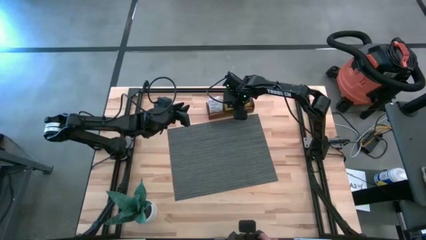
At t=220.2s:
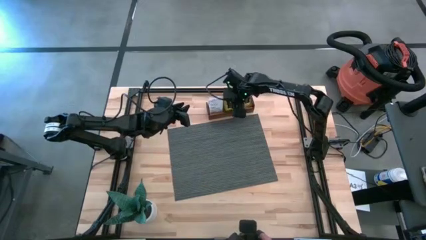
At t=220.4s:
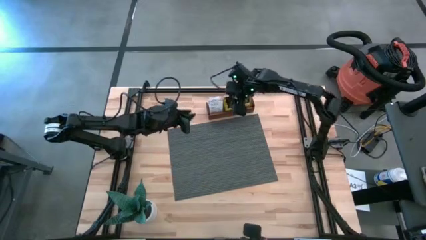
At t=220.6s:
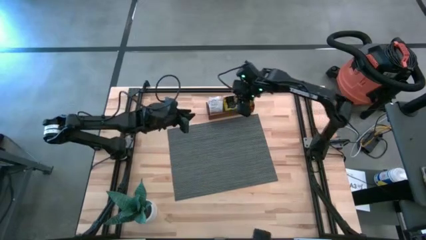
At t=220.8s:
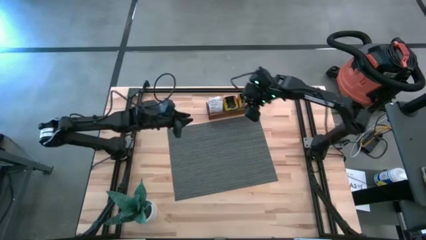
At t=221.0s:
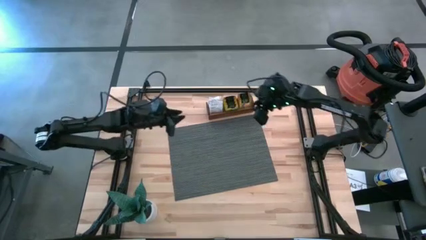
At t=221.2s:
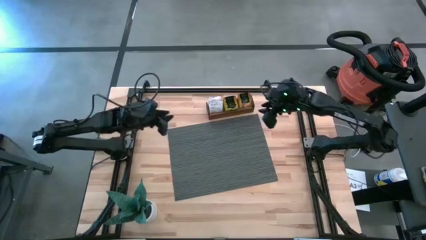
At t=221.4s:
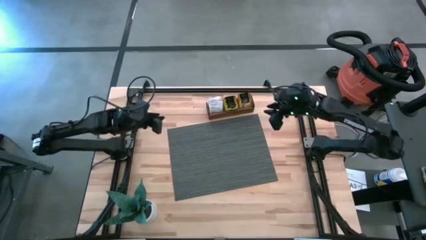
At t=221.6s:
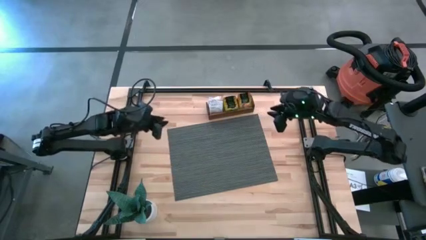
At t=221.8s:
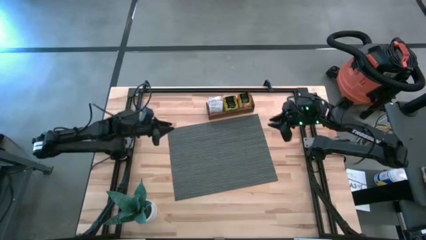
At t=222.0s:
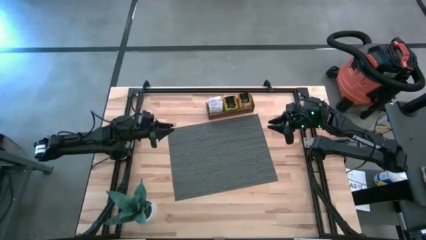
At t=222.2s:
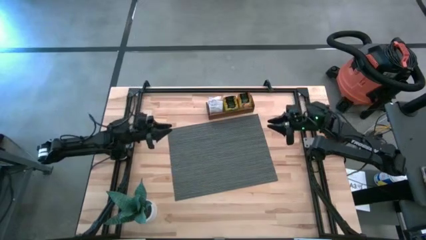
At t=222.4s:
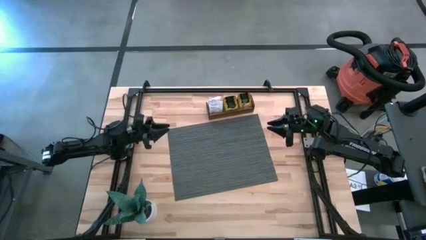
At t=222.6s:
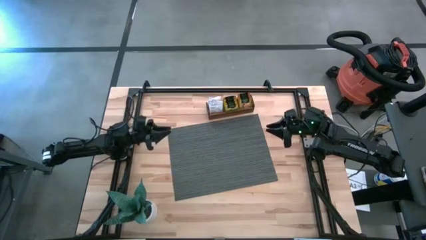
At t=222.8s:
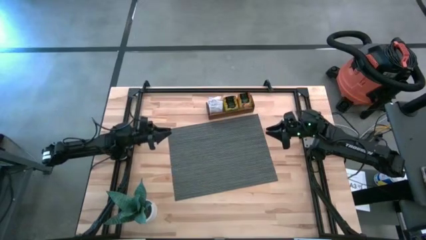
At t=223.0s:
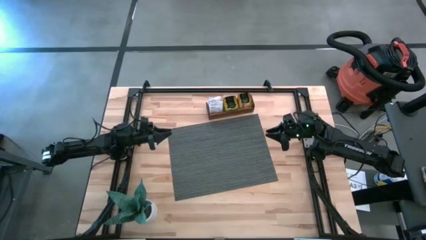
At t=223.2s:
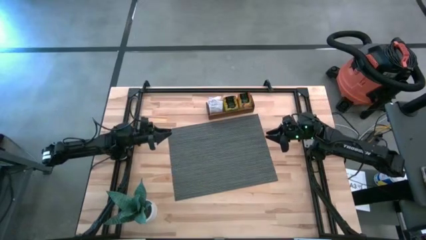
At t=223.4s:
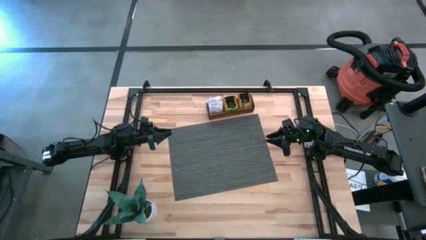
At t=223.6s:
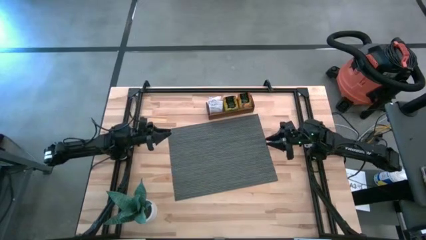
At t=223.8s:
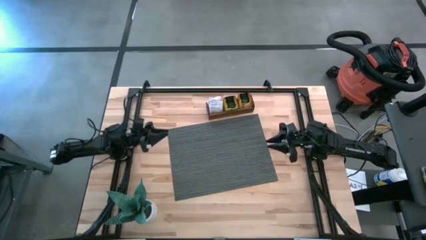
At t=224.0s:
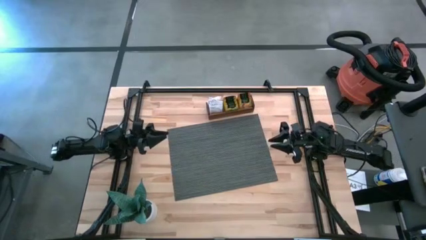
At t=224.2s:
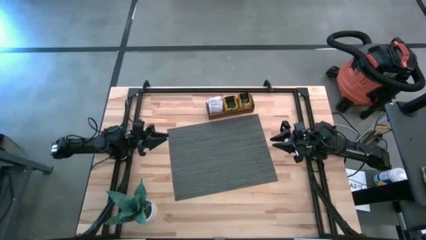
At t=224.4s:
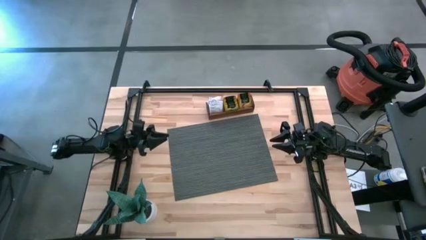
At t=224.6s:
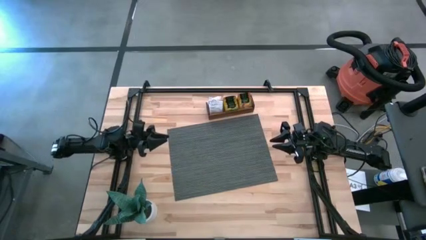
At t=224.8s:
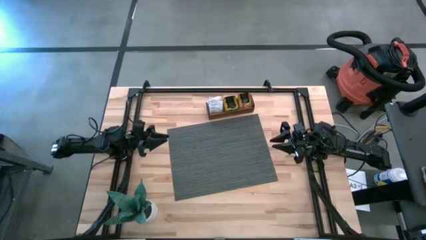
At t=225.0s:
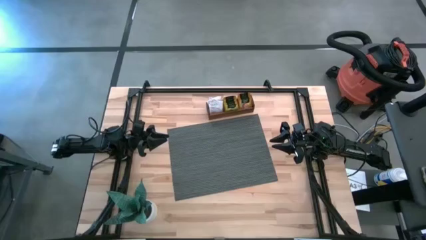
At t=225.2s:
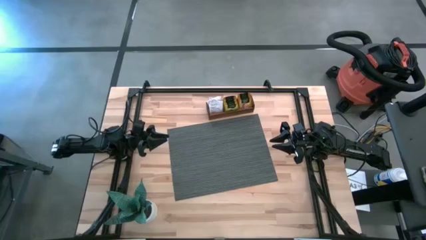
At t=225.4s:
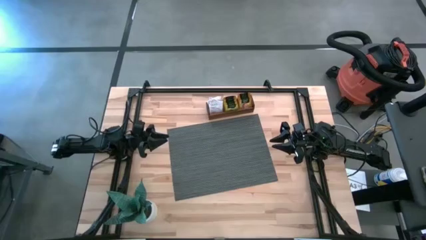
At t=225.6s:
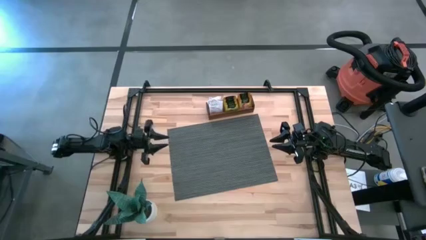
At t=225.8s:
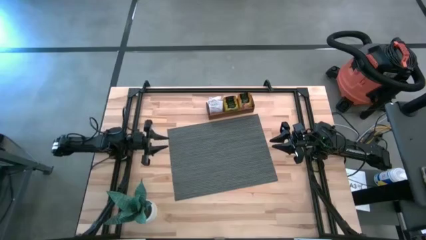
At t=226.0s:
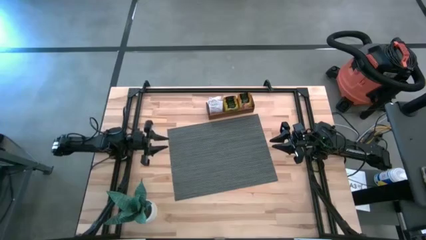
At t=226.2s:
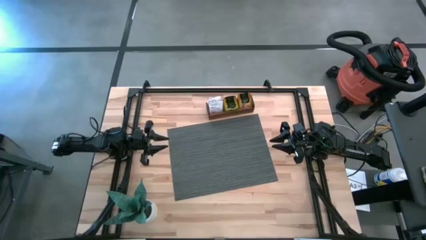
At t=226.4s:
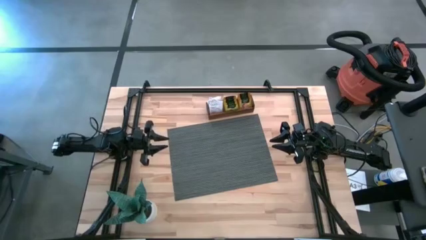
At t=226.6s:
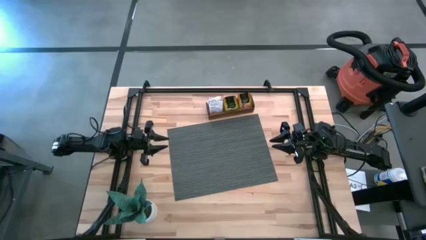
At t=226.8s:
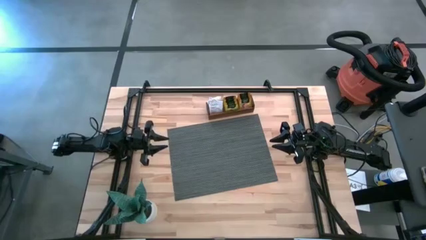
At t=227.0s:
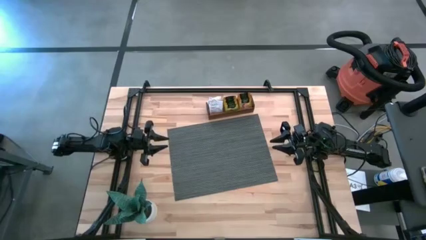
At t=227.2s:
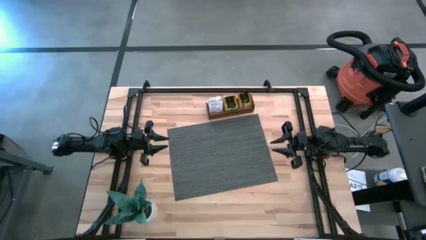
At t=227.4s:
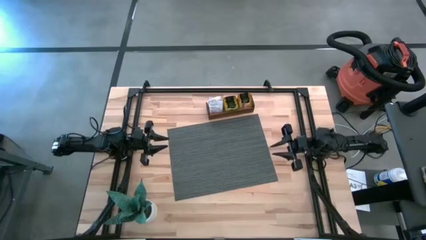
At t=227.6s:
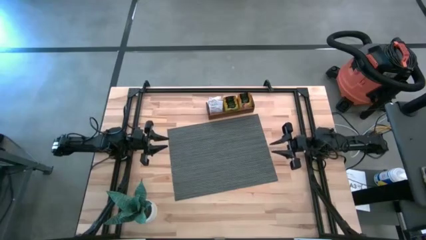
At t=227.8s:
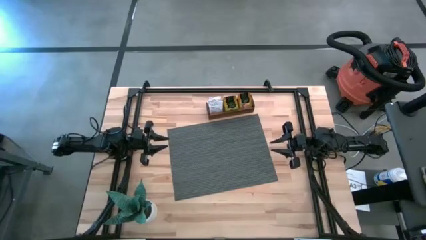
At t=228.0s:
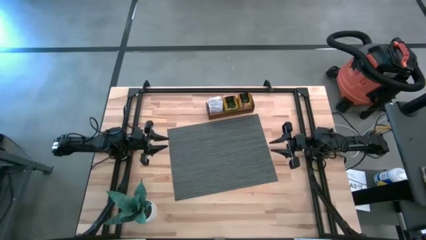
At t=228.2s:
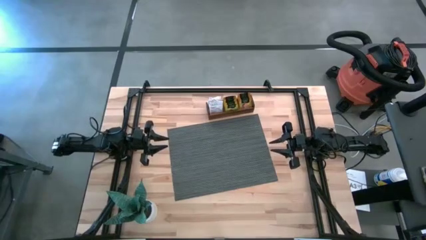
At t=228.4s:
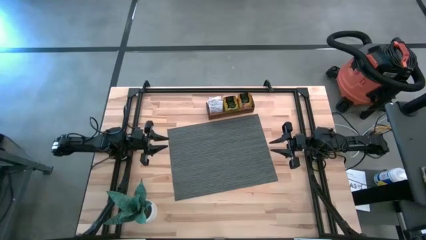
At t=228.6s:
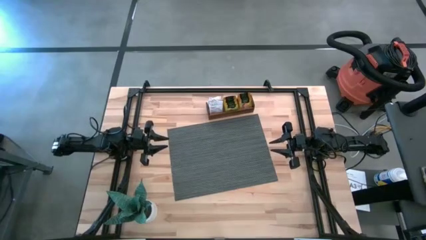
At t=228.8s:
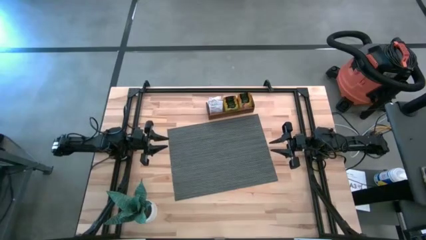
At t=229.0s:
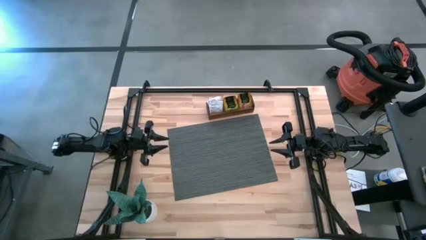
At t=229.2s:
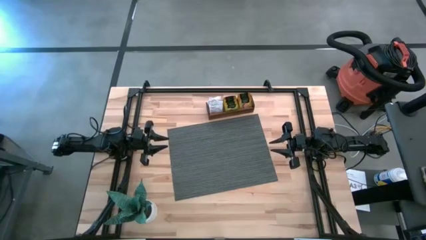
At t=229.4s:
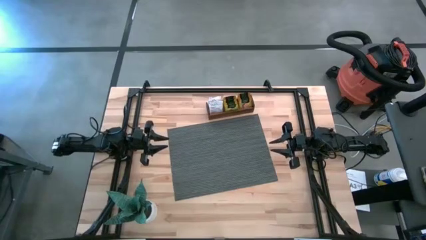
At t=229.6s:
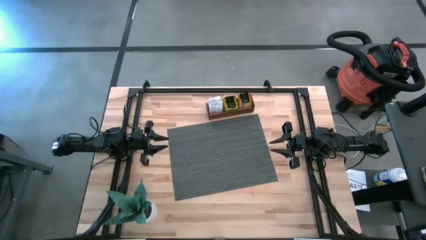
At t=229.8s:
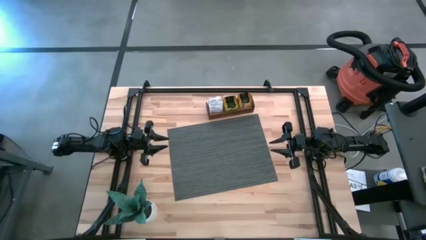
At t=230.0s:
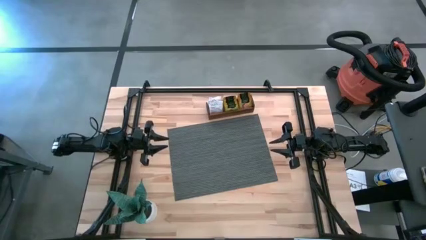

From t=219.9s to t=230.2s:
Task: Pick & Place Tea
Return to Home Position

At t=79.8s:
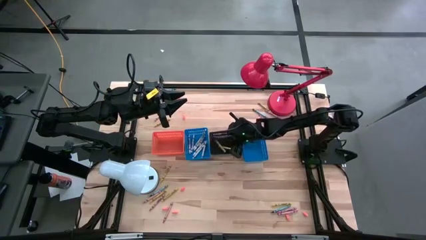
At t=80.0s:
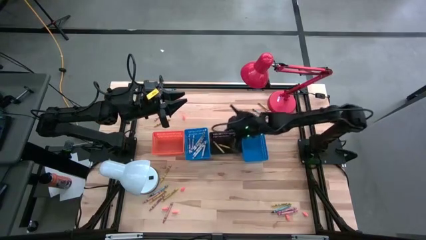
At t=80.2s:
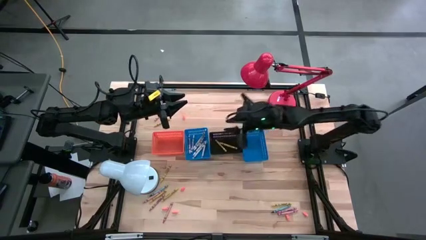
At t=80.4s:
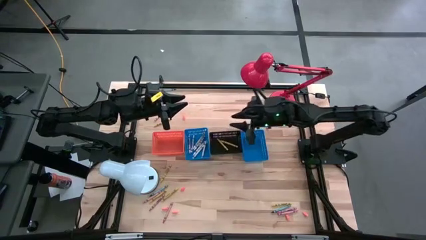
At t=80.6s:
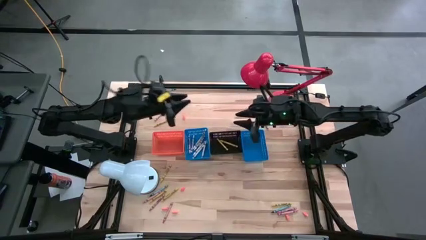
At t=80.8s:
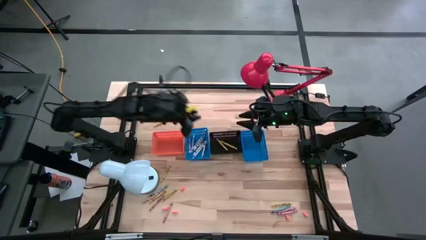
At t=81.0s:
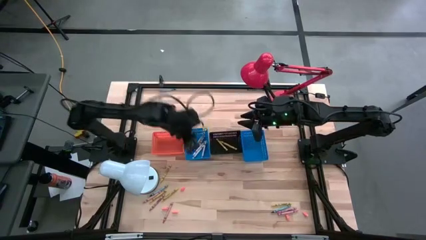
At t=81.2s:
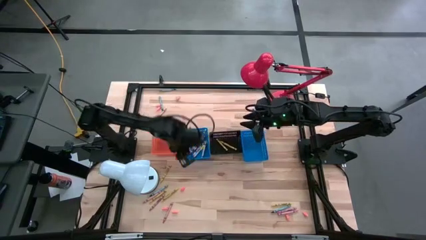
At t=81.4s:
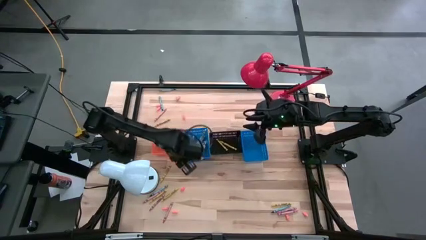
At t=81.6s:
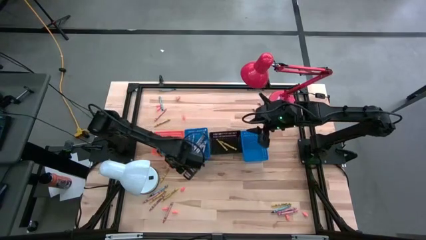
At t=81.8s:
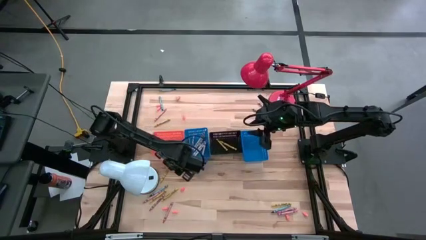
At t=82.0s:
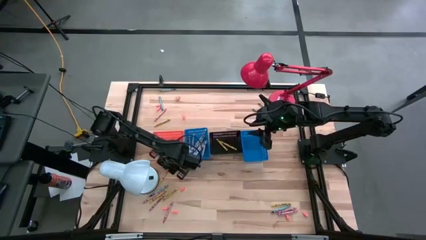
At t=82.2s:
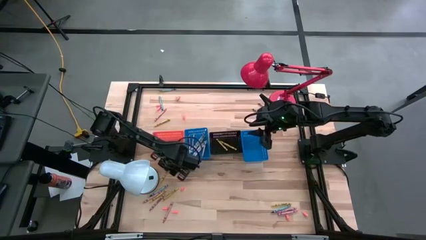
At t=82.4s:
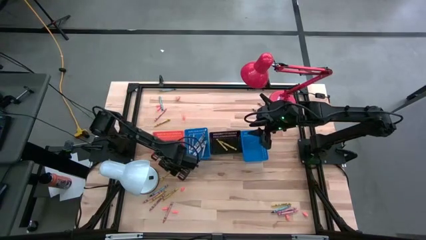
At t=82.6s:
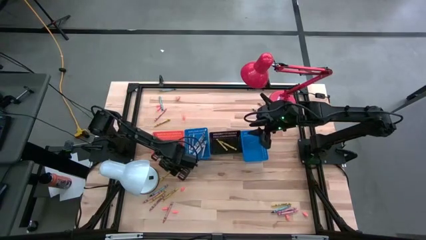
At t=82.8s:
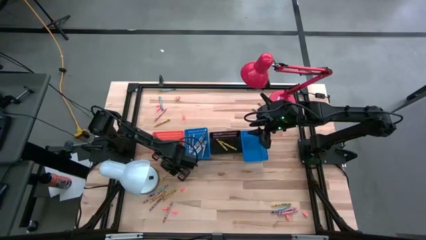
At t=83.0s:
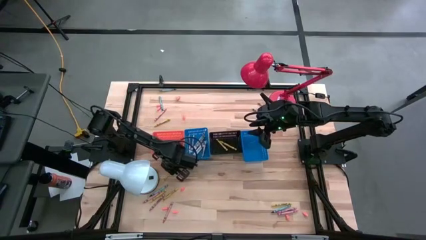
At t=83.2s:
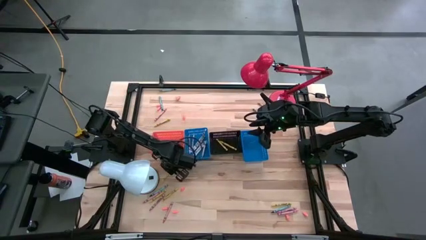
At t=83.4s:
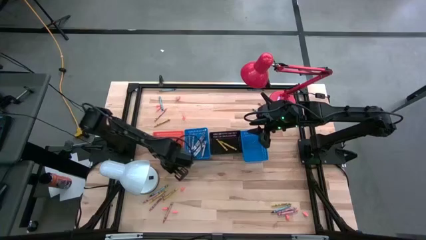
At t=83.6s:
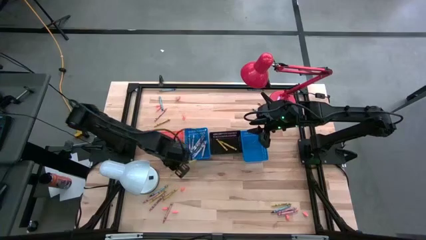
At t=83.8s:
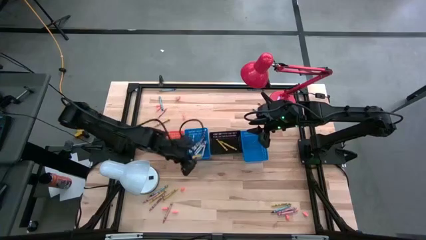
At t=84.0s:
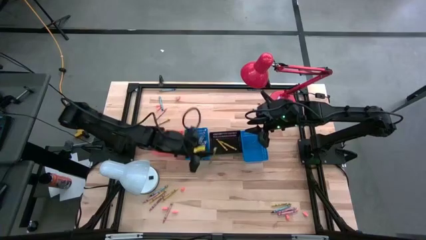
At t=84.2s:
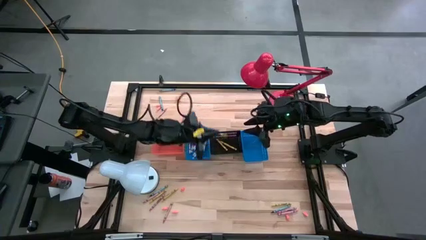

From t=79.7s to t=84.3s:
Task: Sort crayons
Put the yellow crayon into the black bin

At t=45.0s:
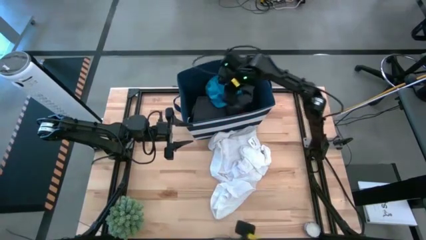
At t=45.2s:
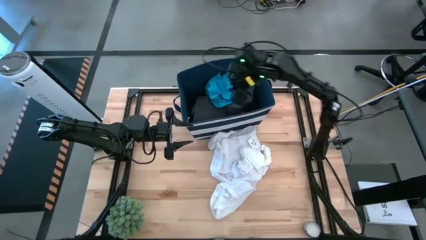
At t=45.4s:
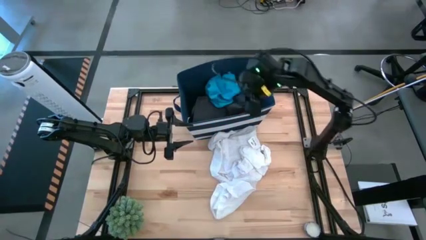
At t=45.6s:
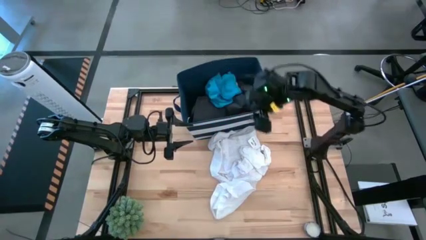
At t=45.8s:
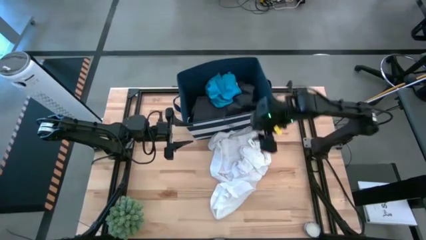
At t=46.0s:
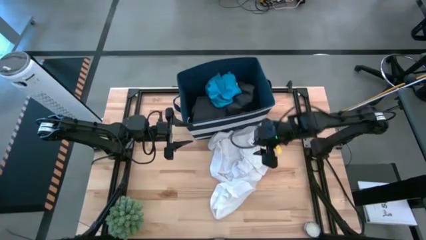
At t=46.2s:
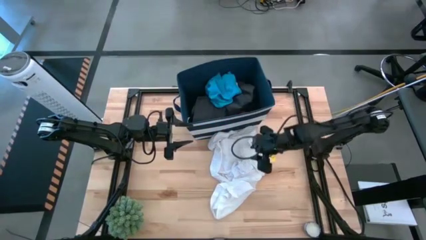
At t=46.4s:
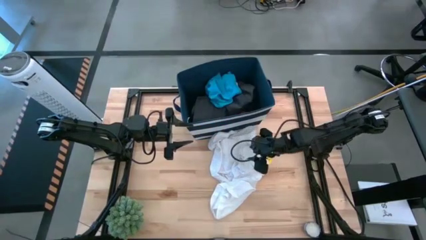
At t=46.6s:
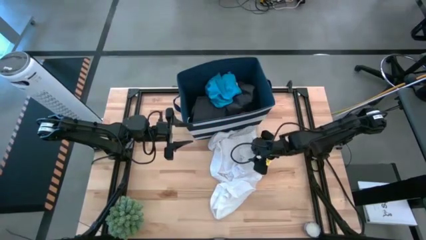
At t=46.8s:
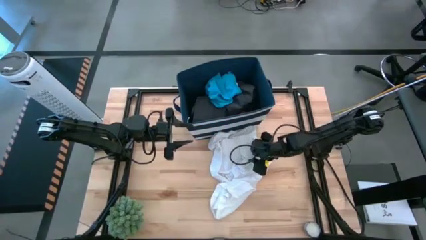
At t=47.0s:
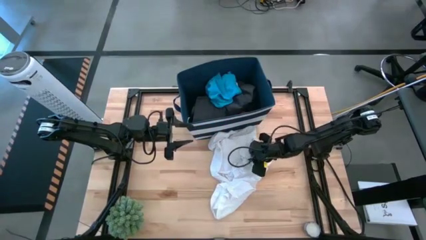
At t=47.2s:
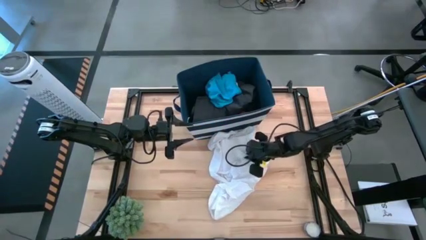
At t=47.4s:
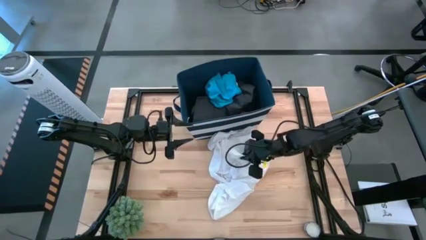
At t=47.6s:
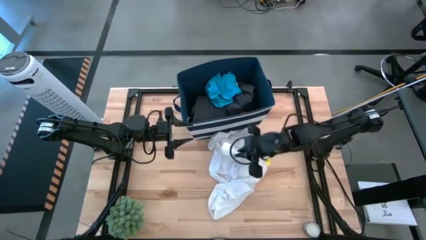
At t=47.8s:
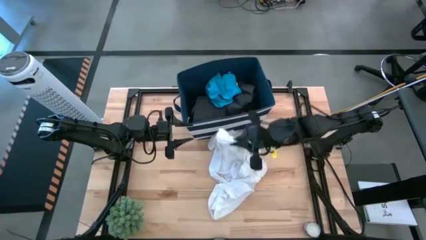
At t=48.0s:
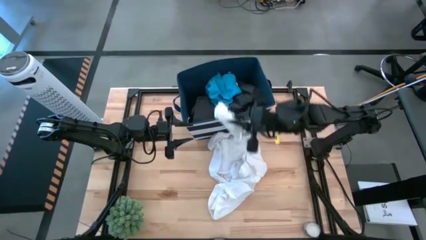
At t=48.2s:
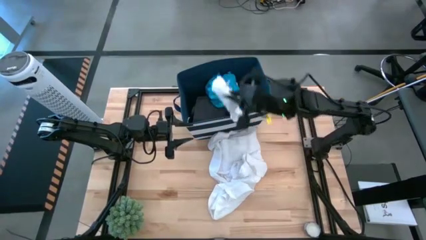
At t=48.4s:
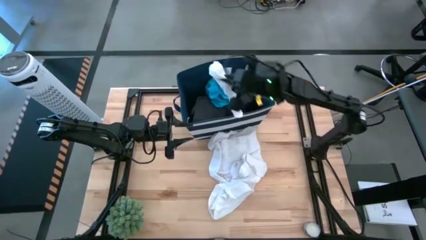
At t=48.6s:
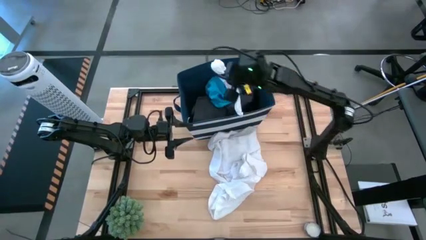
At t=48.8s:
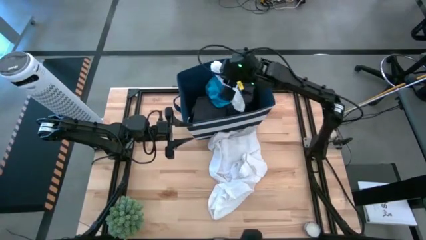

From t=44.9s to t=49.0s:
Task: Sort clothes
Put the white socks into the laundry bin
